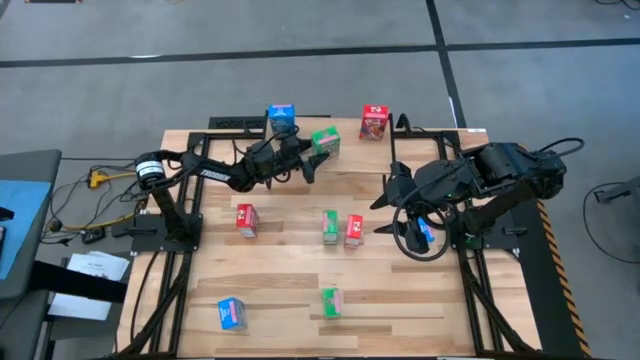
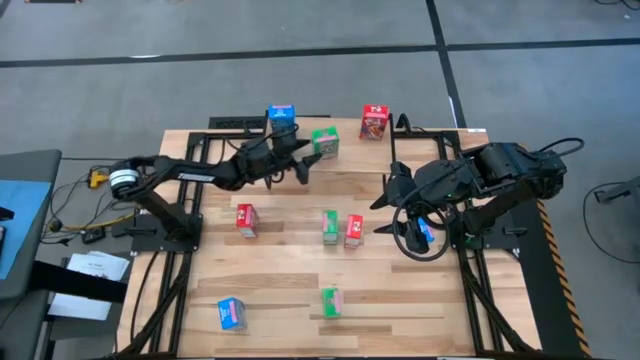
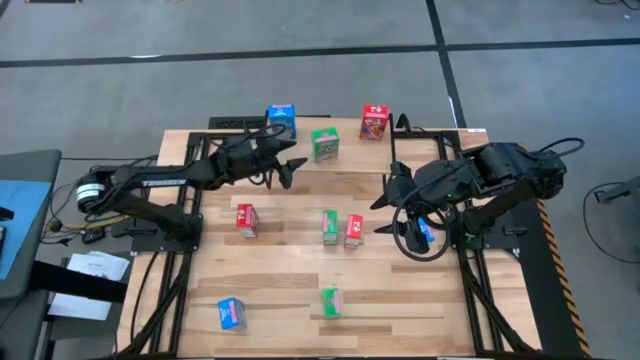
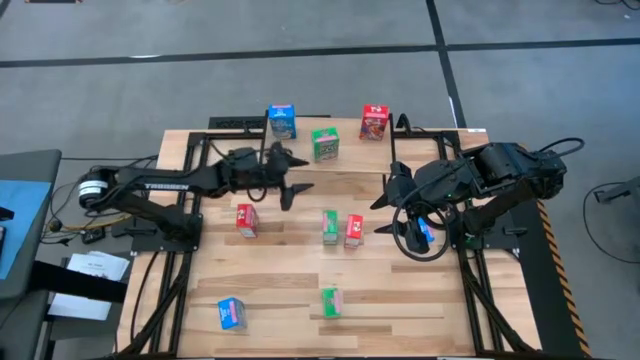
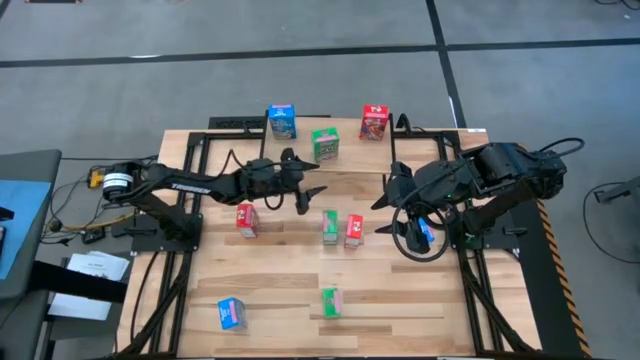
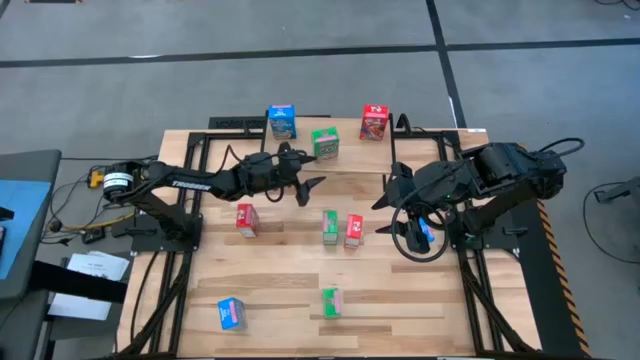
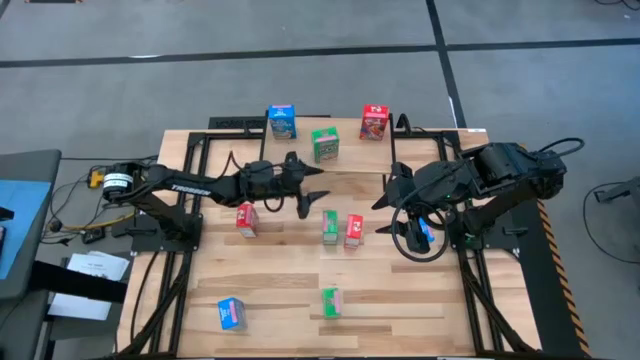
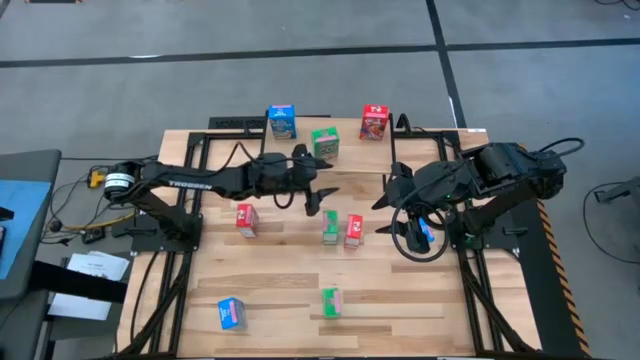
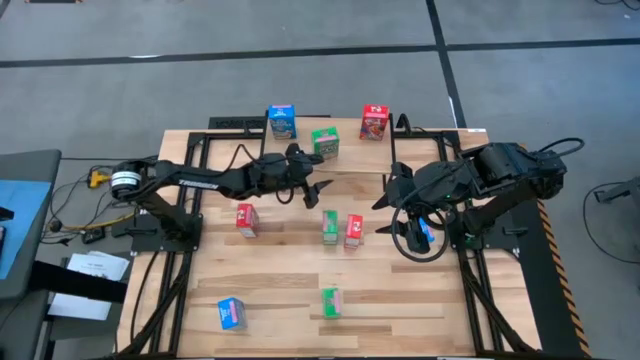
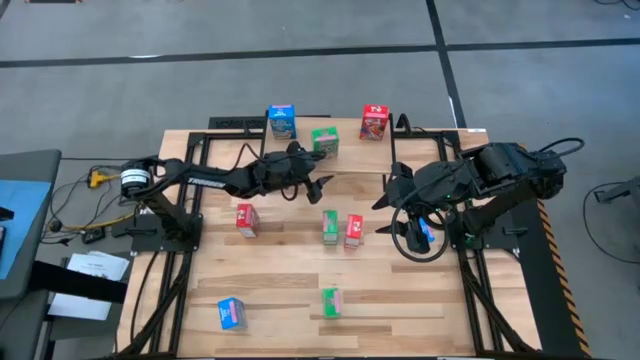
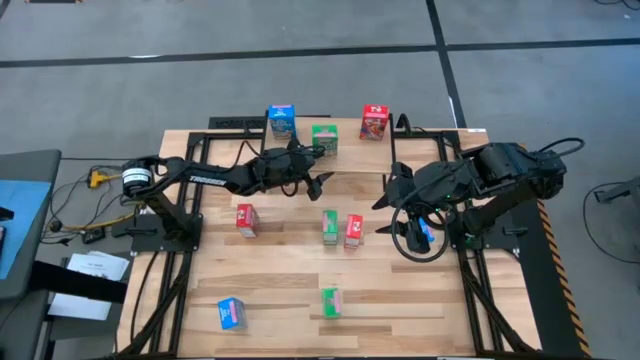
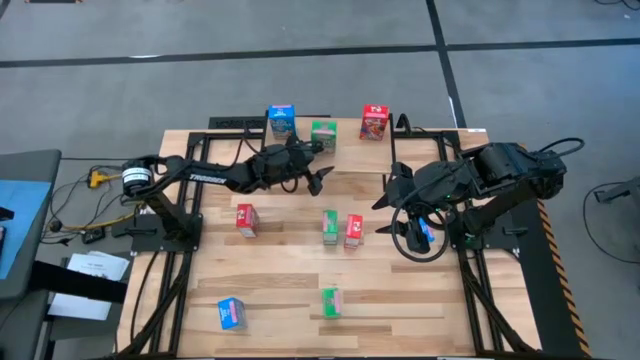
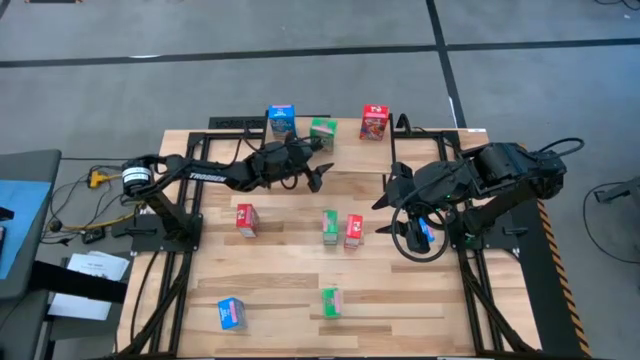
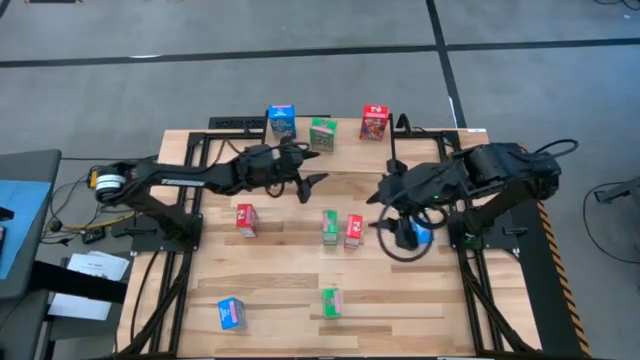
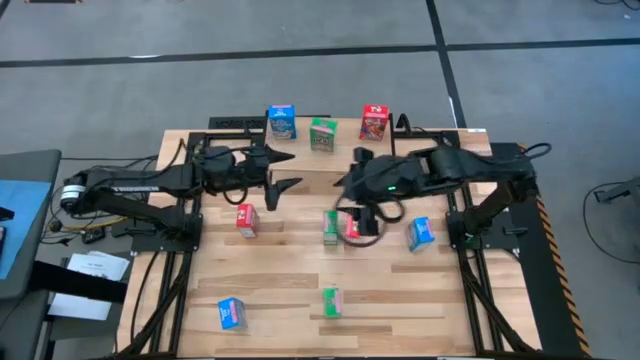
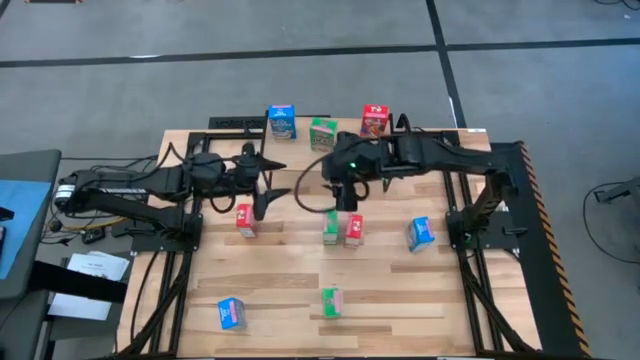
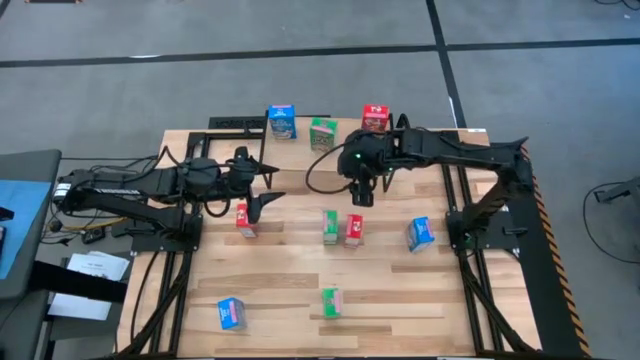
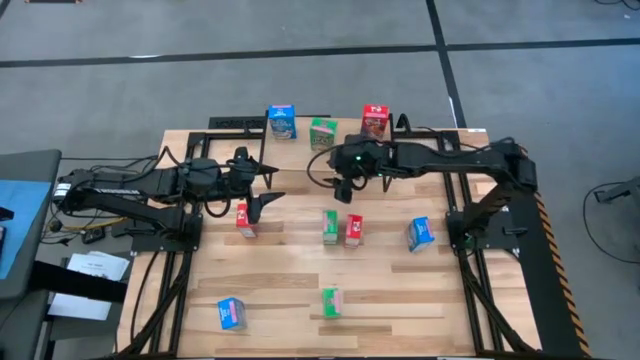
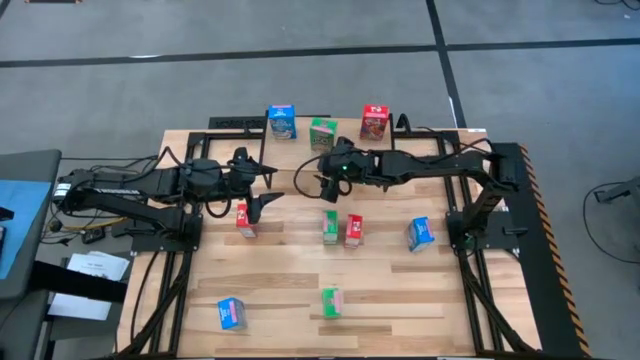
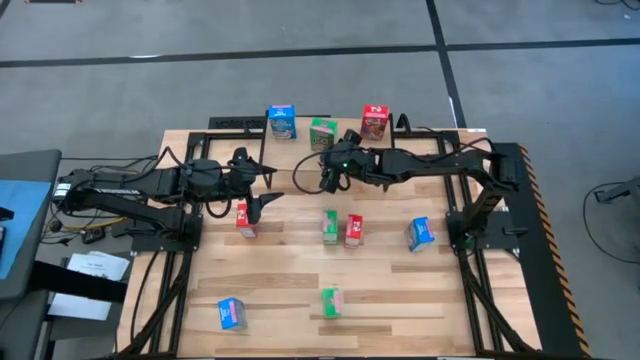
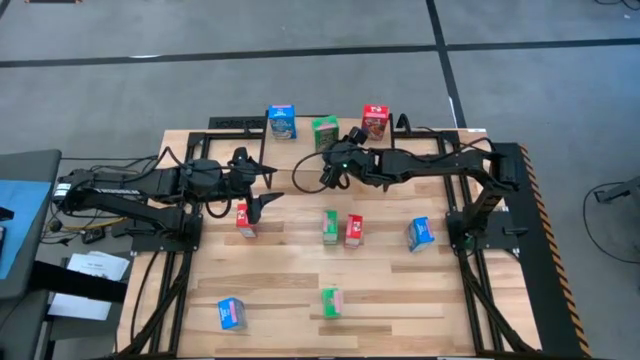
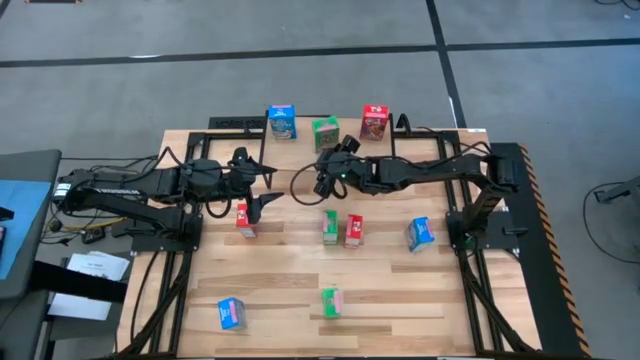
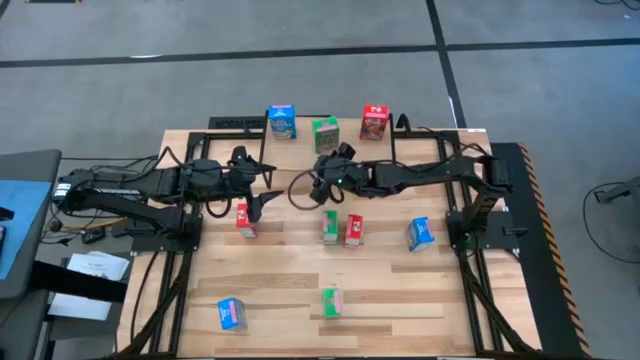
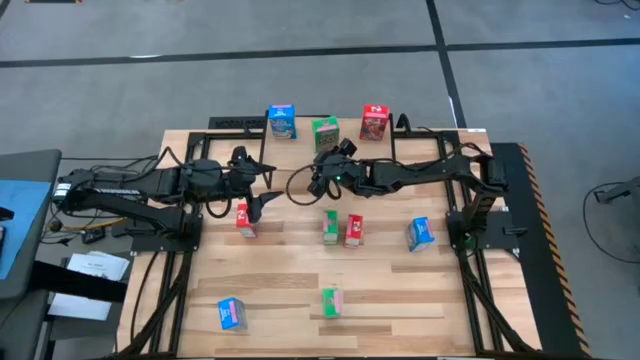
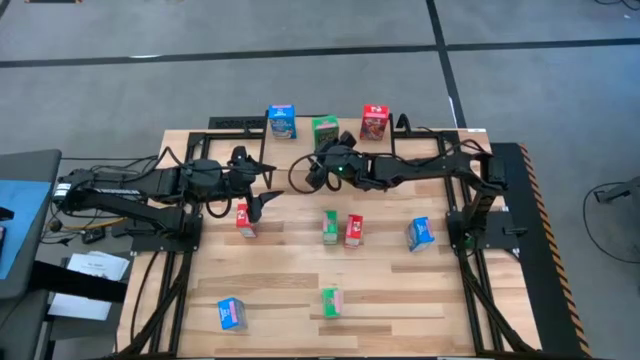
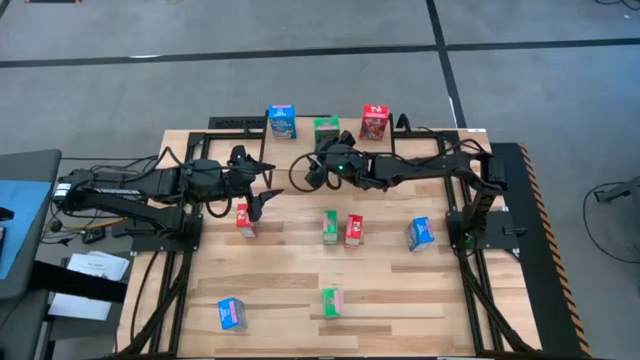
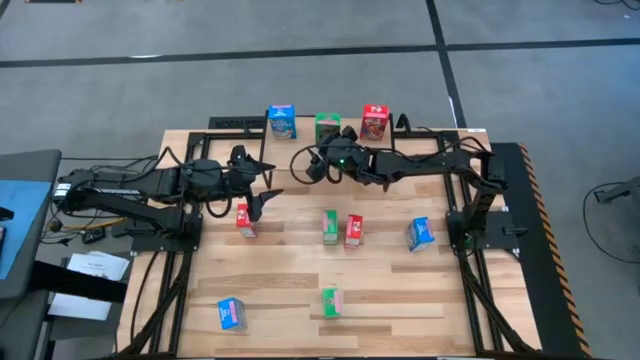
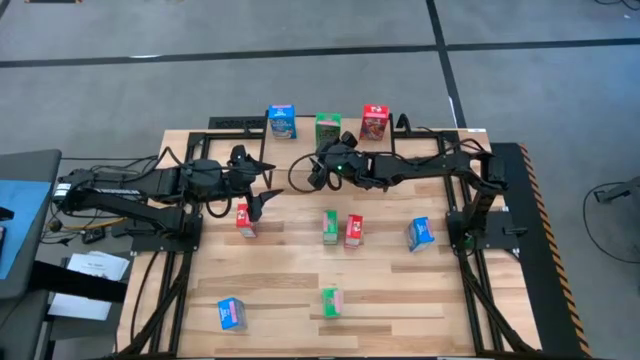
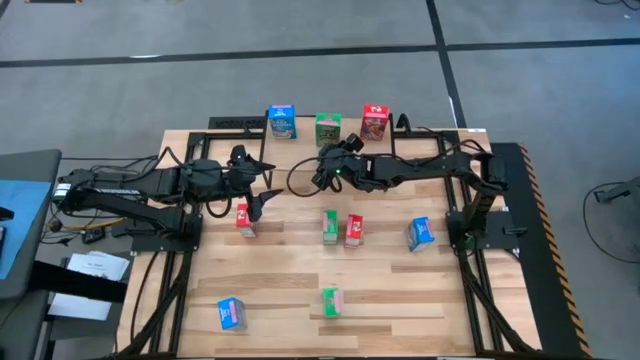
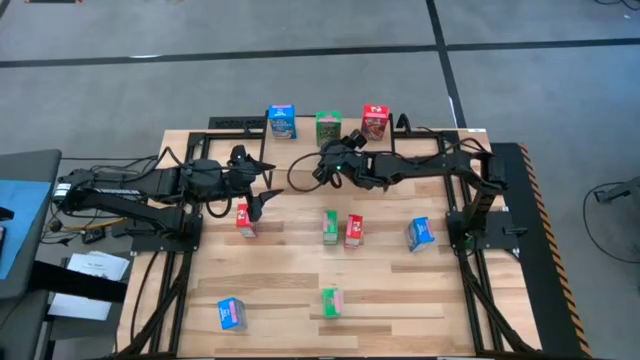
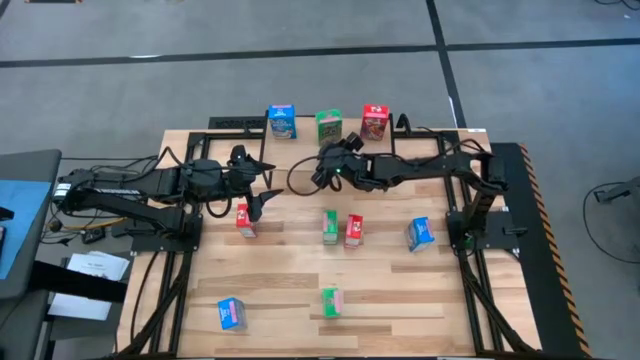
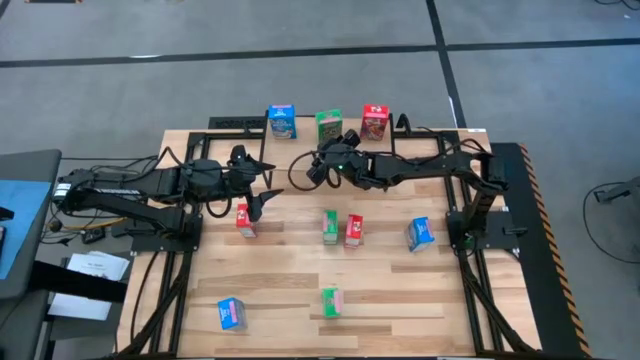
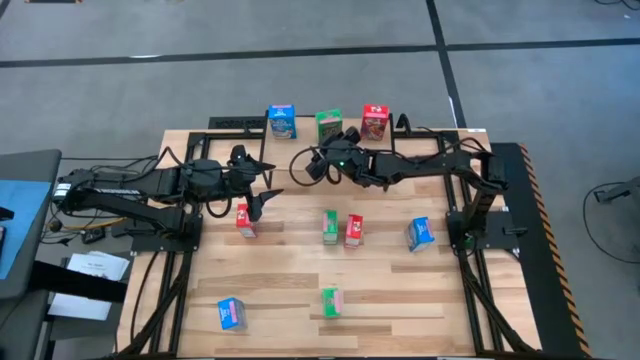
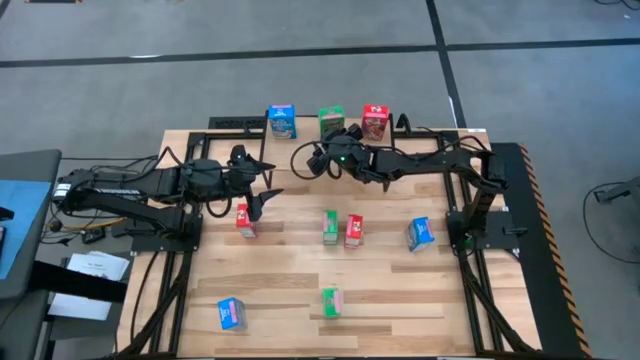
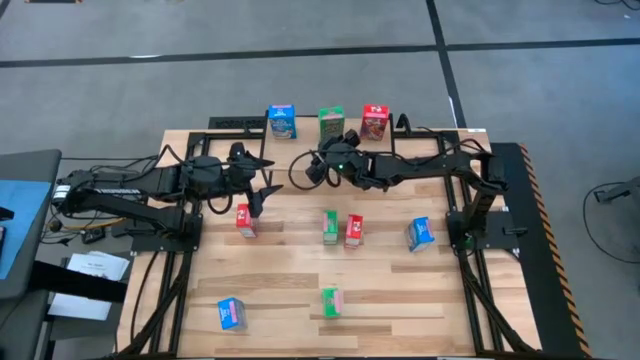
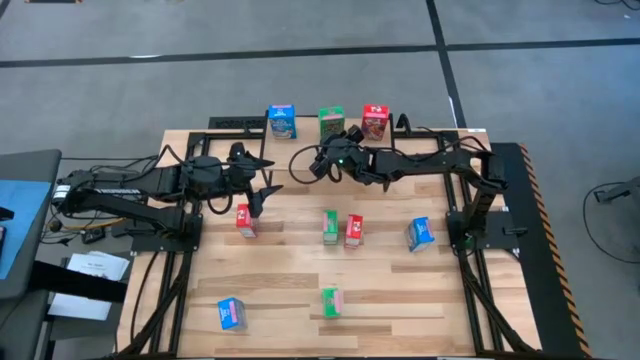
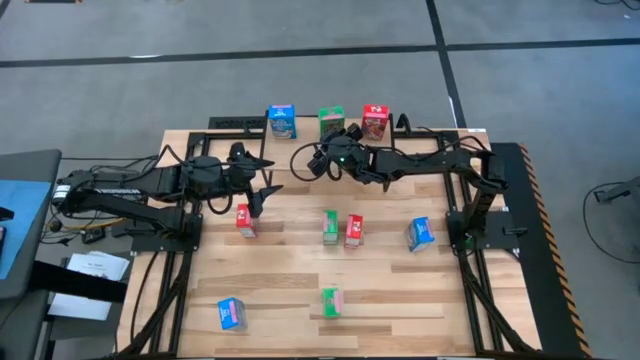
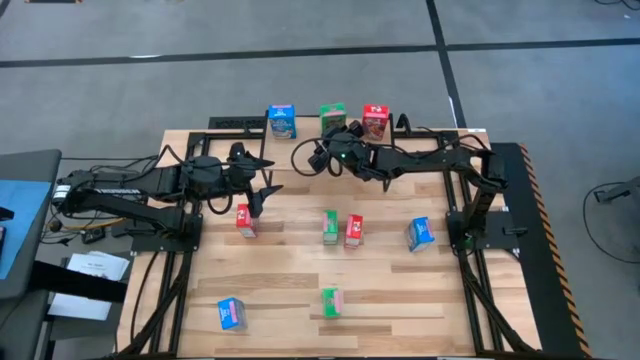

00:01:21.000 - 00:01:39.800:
Task: Stack cereal on shelf
Put the bottom right green cereal box on the shelf

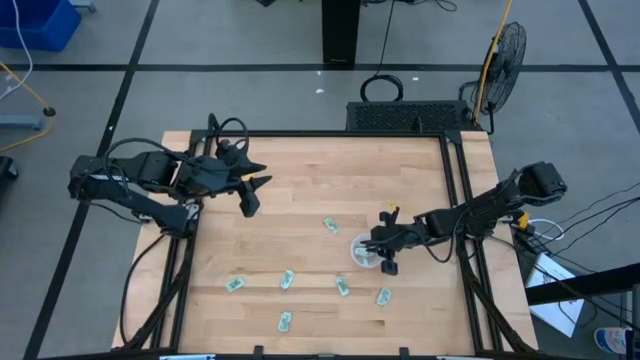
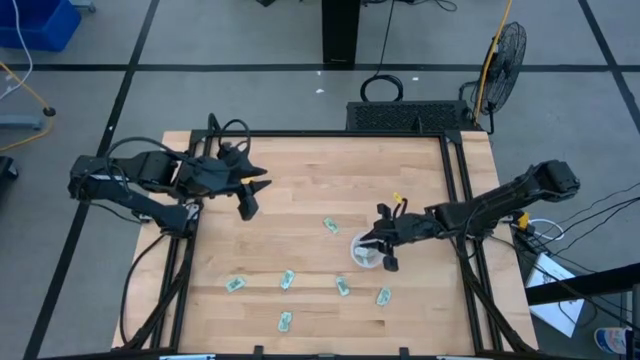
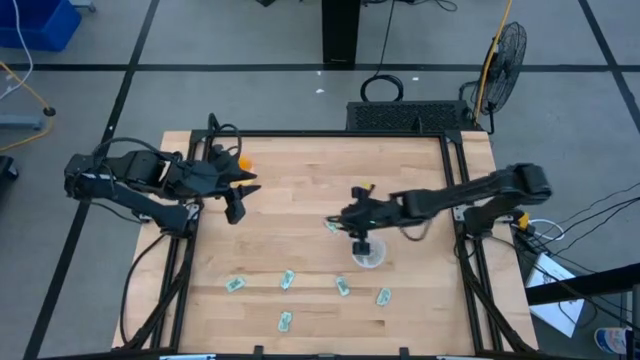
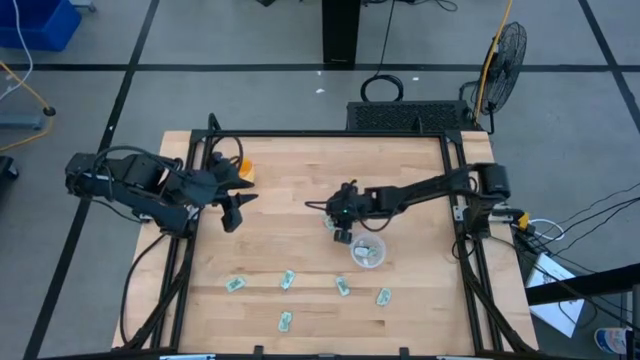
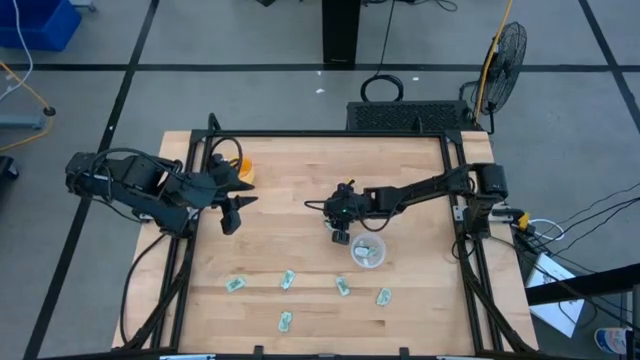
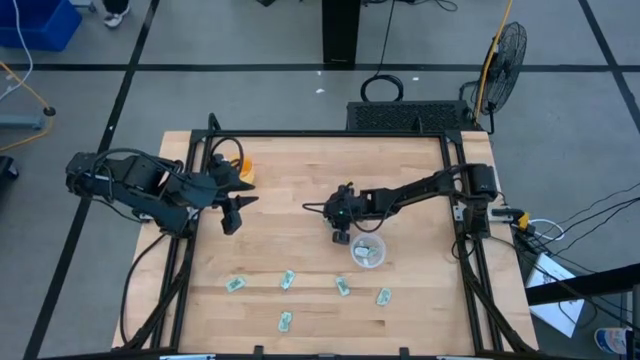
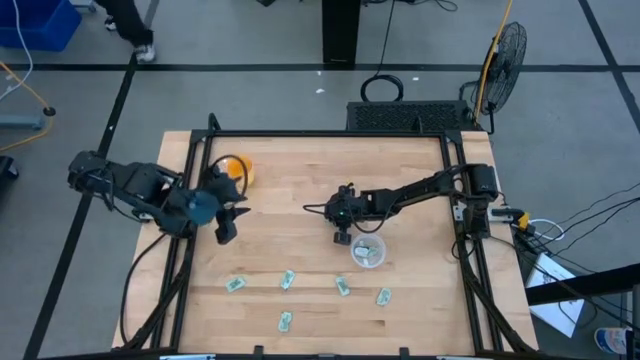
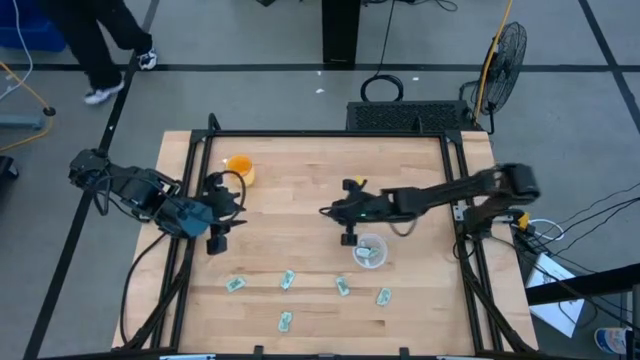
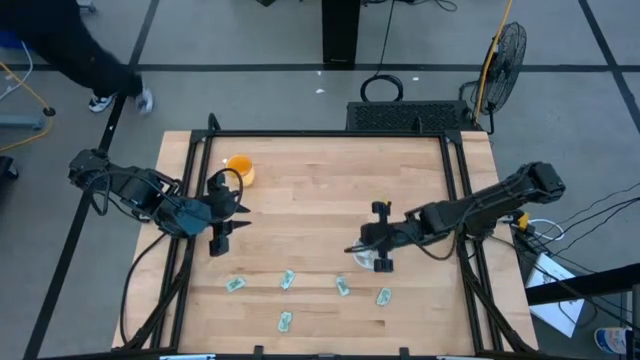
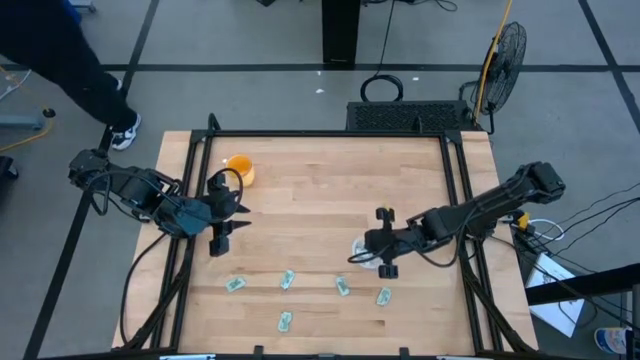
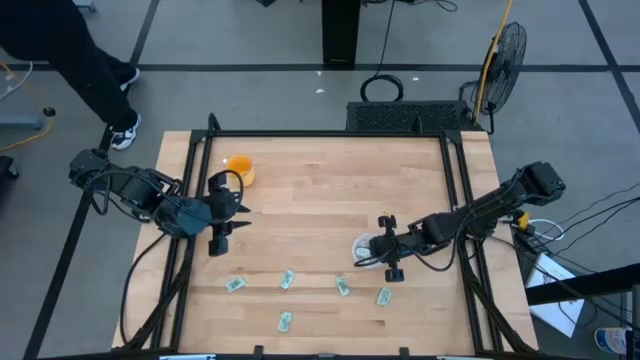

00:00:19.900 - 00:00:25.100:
Task: Pick and place Stevia / Truvia into bins
Put the stevia packet into the transparent container
